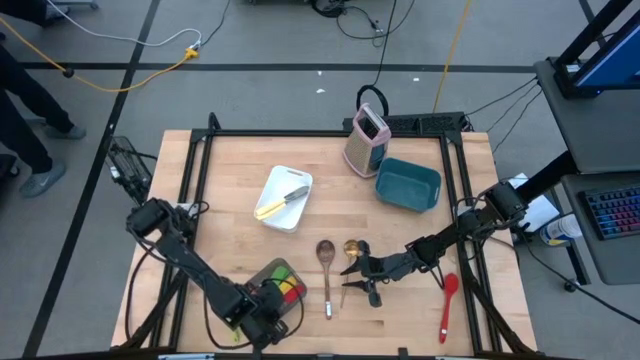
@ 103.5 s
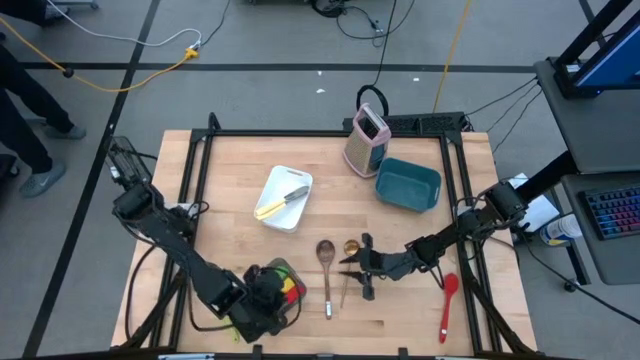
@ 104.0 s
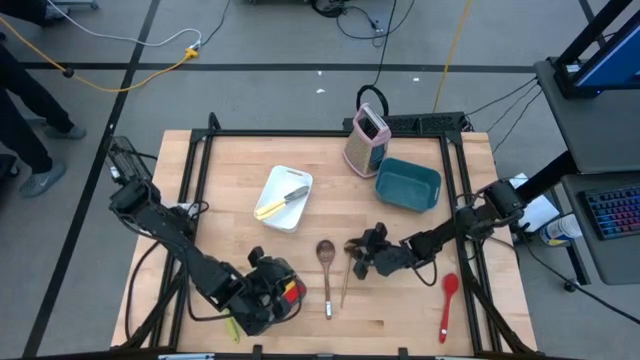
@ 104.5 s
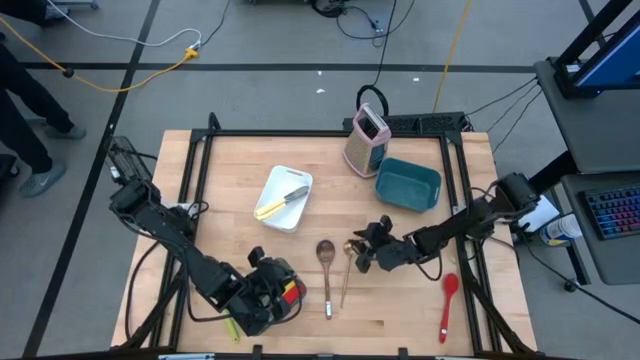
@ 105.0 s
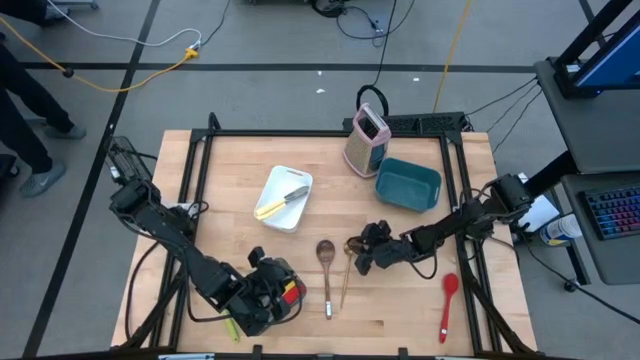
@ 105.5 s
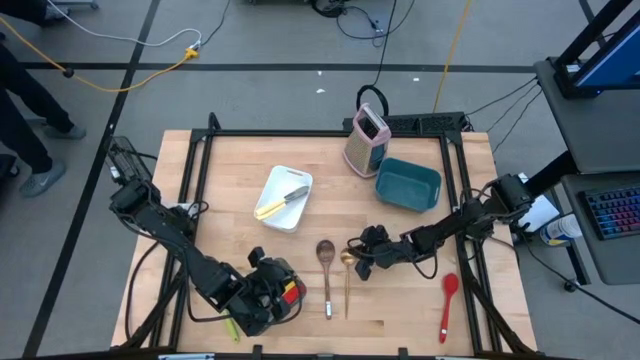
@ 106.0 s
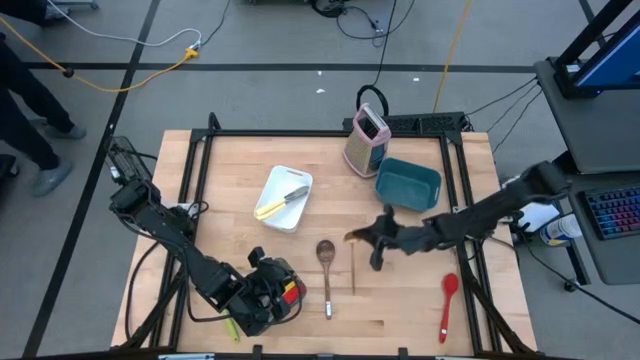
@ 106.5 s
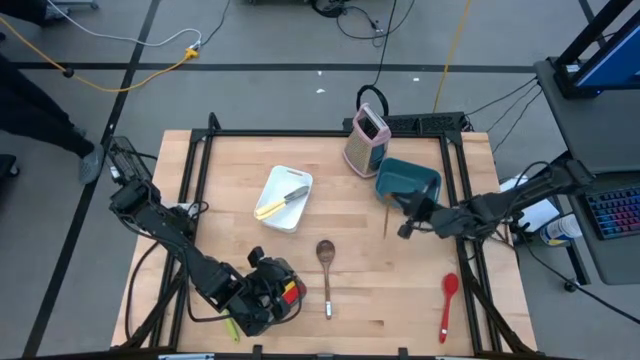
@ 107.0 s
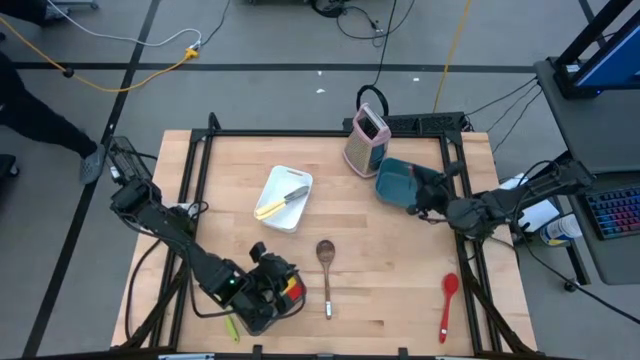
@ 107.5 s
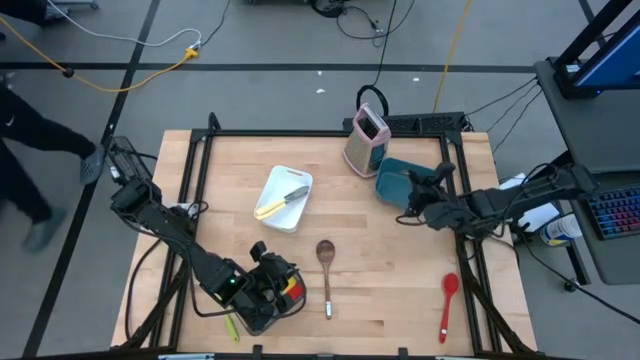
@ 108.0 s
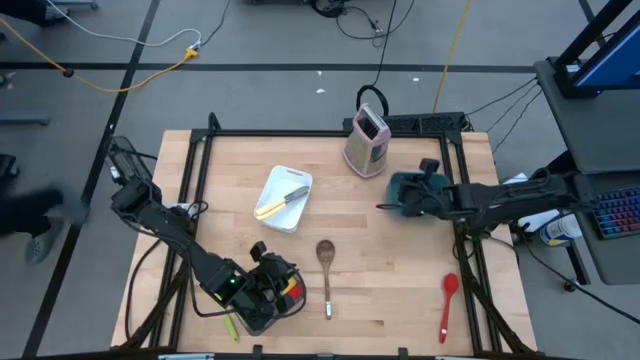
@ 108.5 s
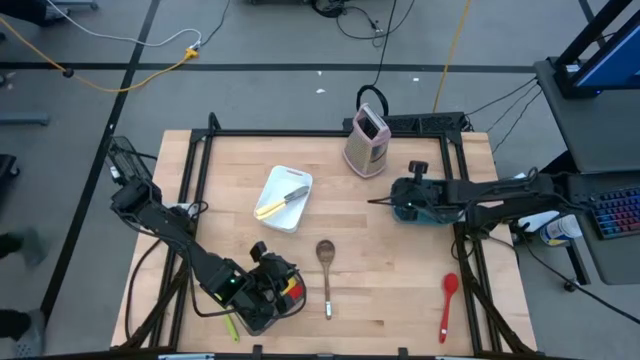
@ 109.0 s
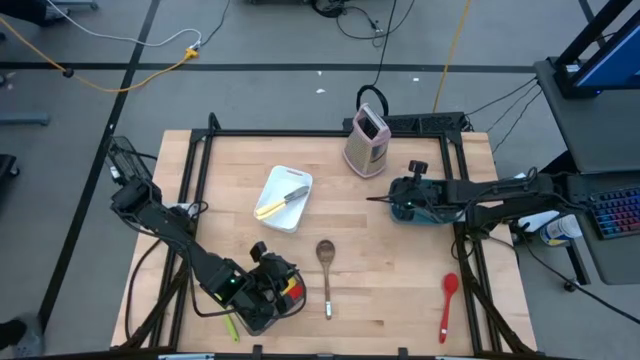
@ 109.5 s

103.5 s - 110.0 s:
Task: Pick & Place Kitchen Items
Put the gold spoon into the blue bin

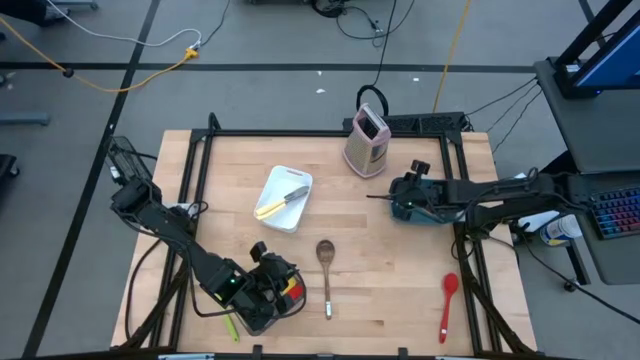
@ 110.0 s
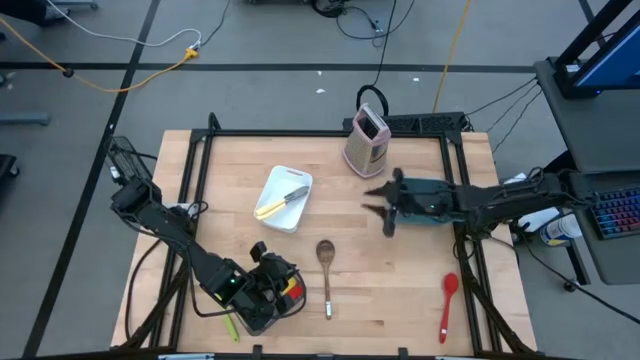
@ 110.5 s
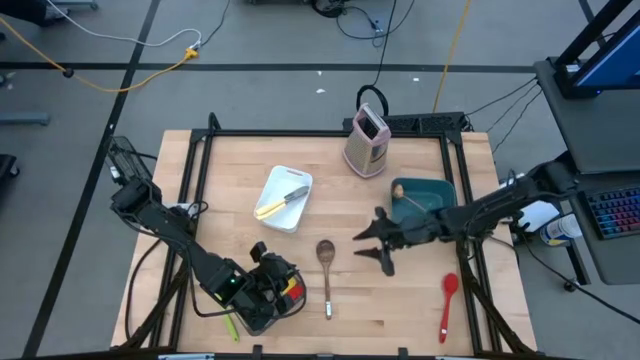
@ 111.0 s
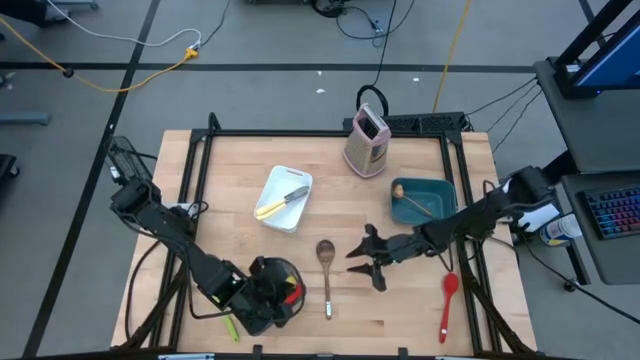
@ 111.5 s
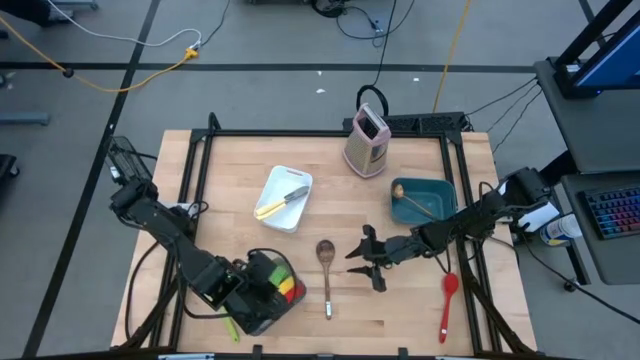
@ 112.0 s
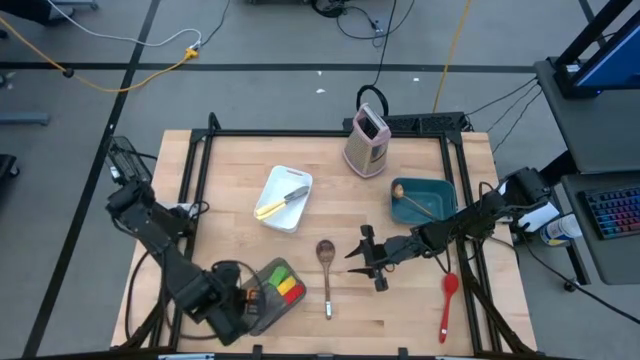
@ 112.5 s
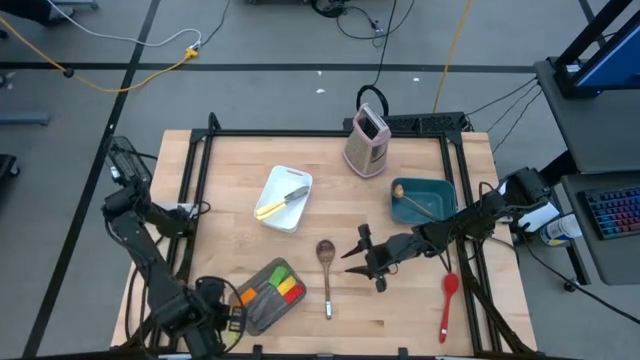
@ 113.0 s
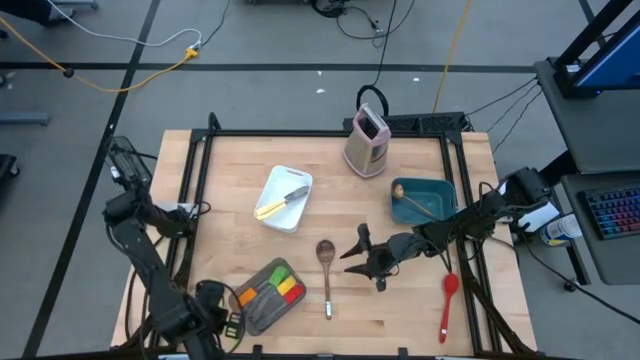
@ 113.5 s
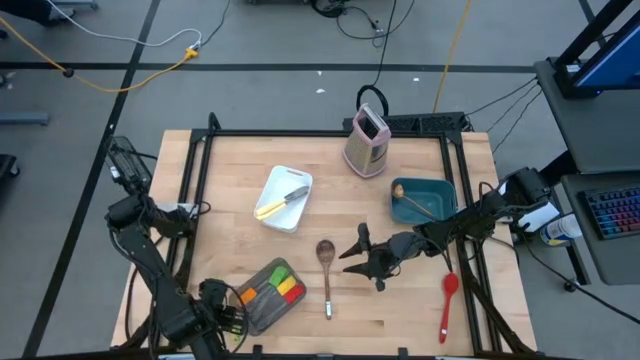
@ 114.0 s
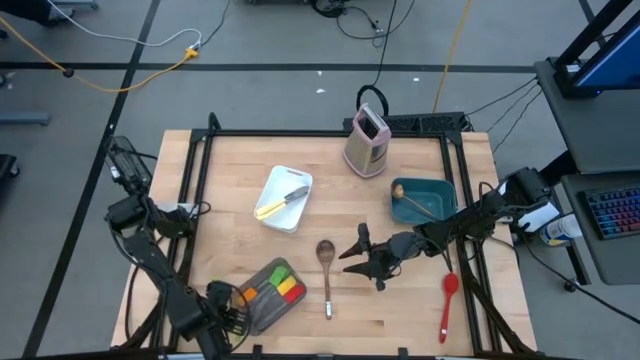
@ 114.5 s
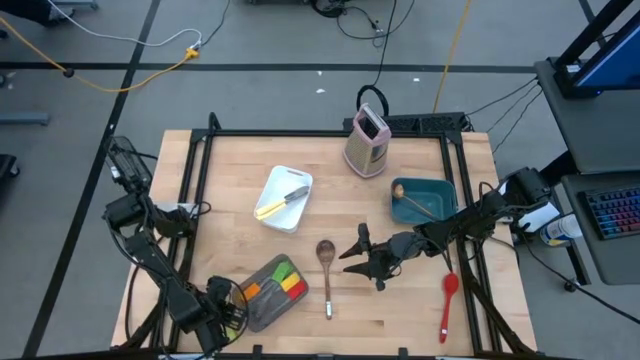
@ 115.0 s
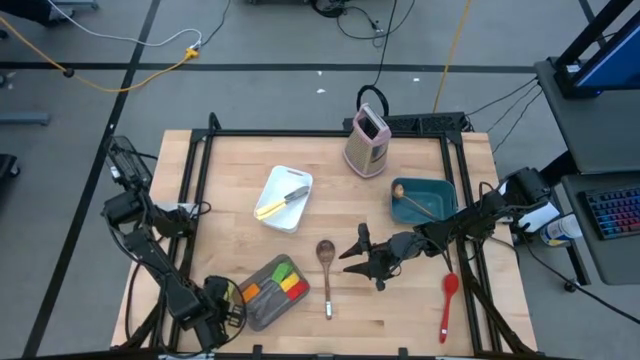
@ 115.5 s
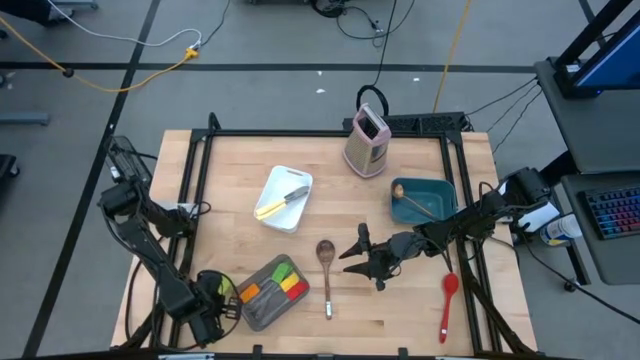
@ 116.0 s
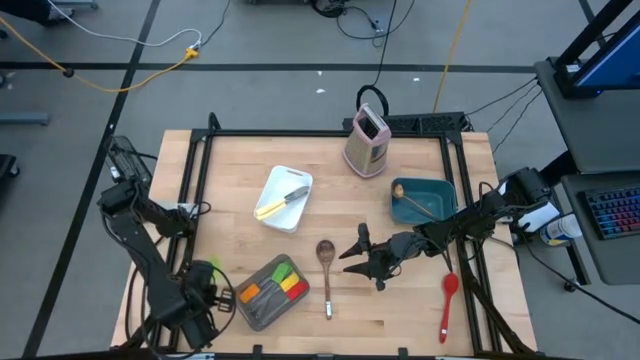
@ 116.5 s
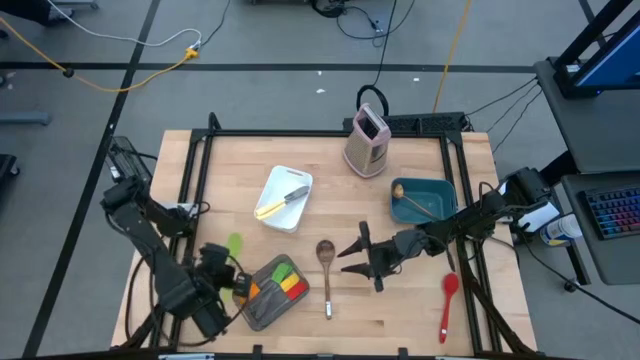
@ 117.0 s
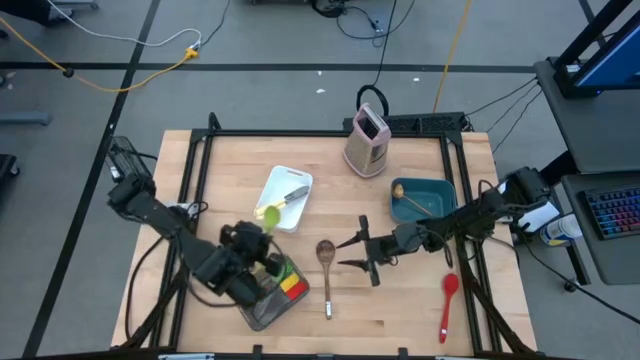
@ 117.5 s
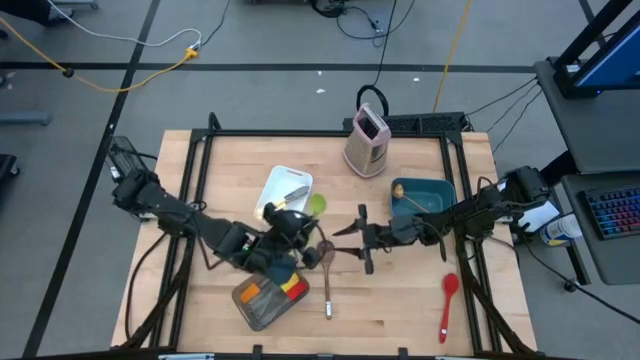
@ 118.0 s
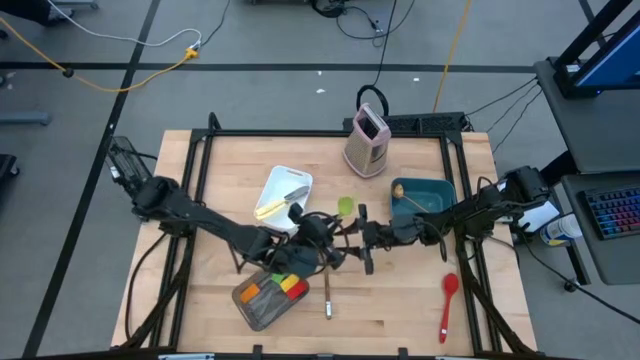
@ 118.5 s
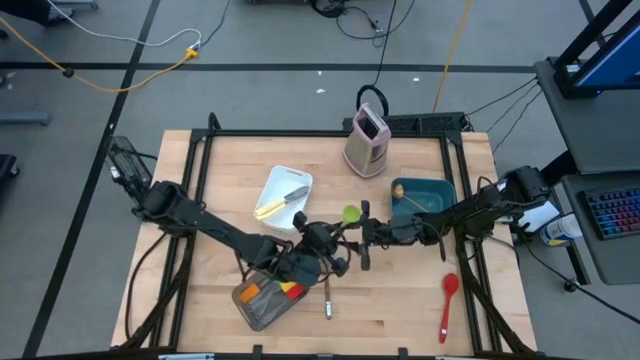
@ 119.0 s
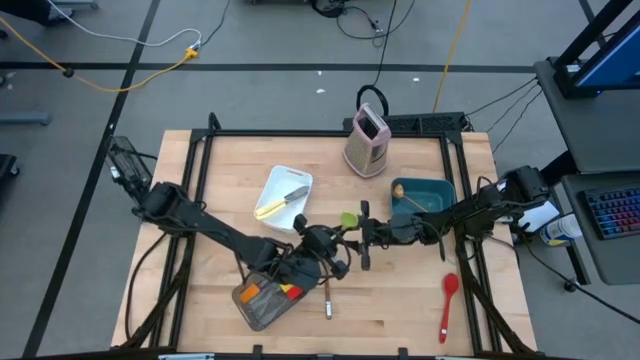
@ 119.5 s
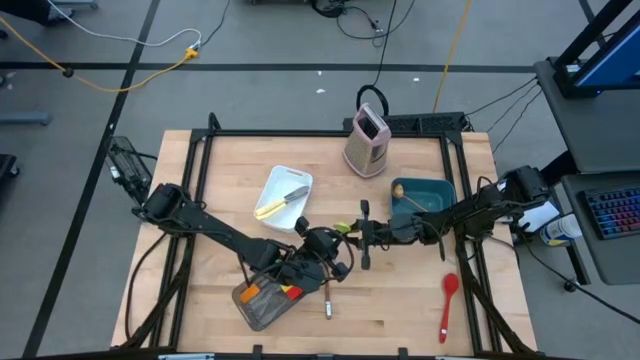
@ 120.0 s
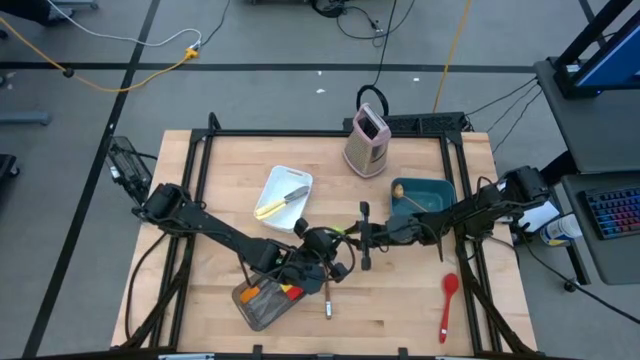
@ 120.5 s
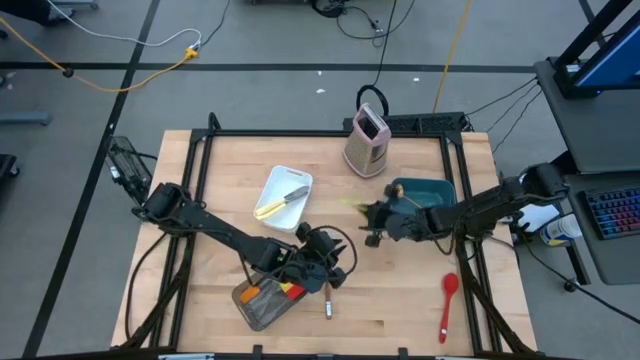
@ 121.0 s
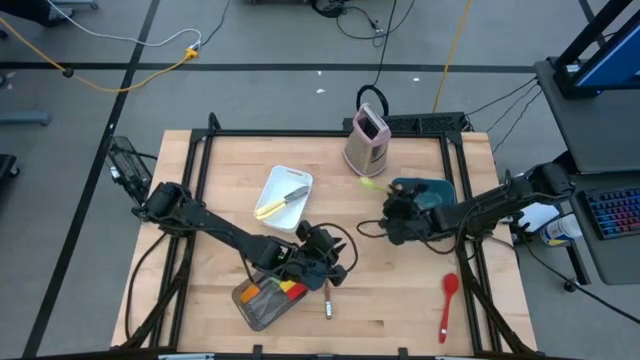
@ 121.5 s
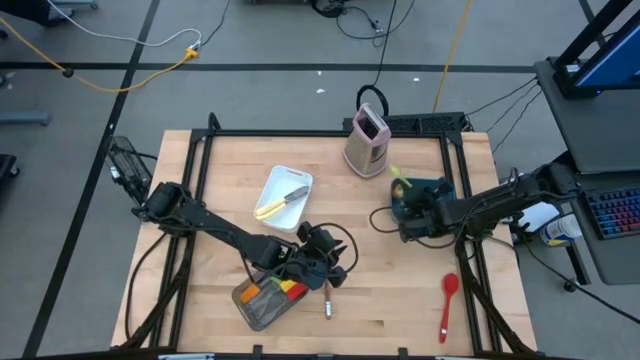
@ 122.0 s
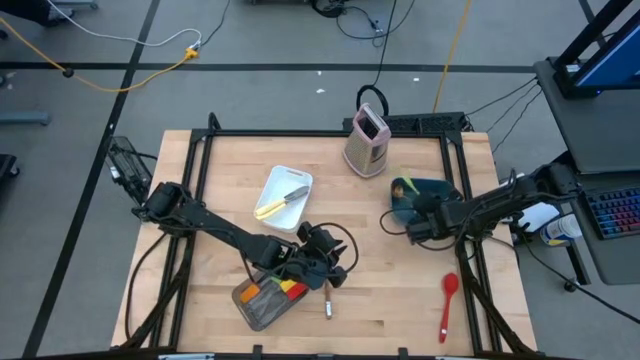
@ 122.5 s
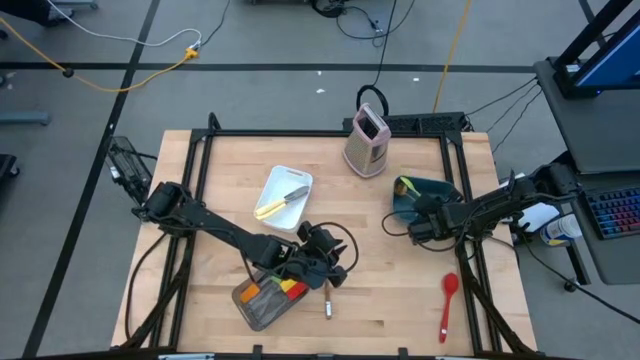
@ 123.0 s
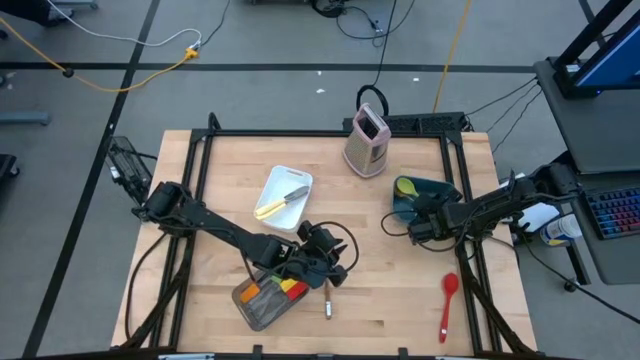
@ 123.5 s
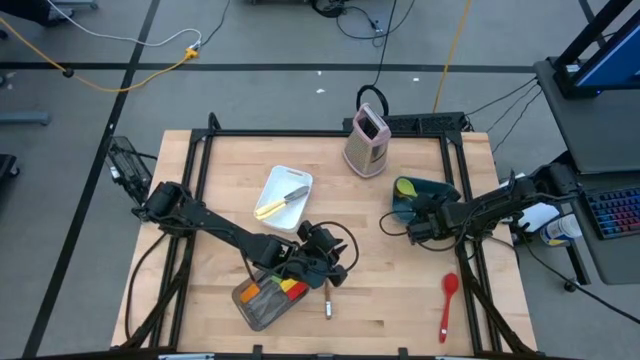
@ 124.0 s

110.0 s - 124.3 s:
Put the green spoon into the blue bin

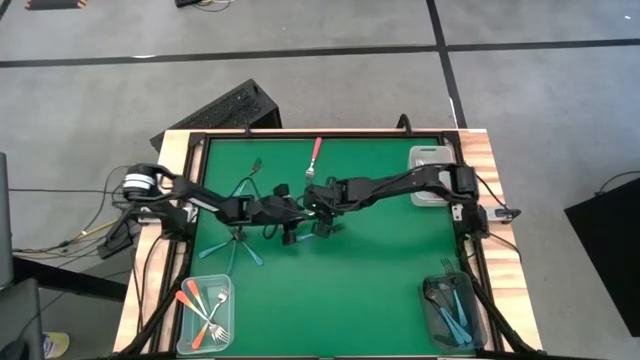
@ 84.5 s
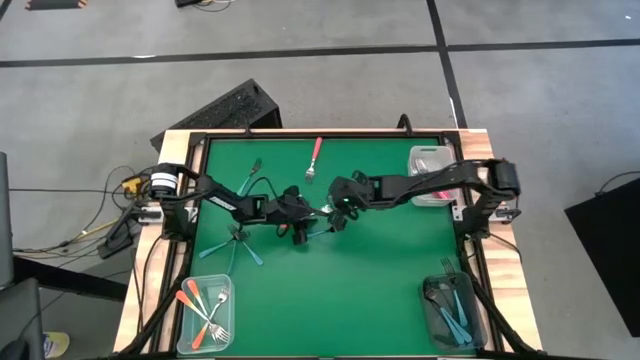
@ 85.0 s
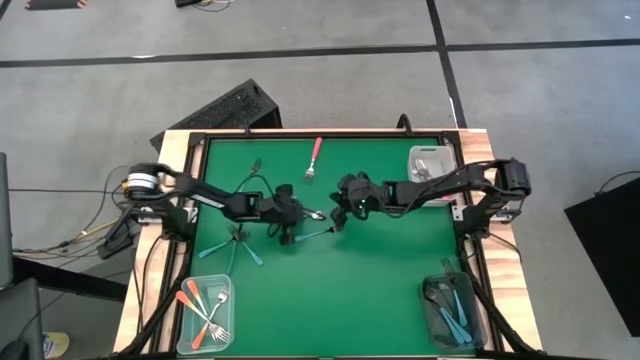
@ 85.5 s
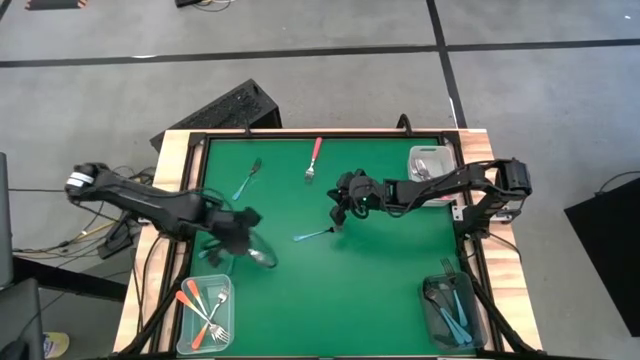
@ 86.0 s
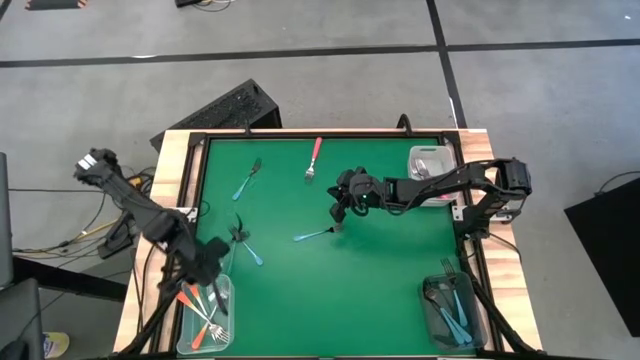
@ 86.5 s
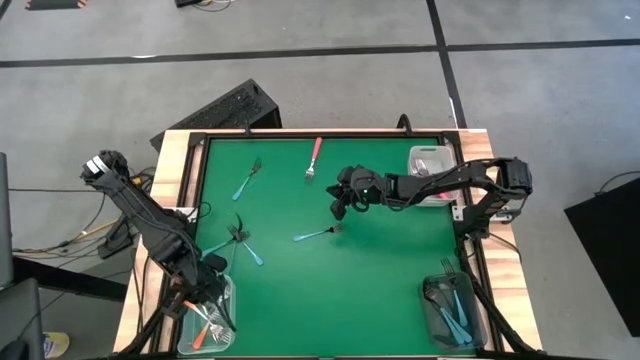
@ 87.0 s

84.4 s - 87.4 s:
Task: Sort silverware by color (type)
Put the orange fork into the transparent bin
